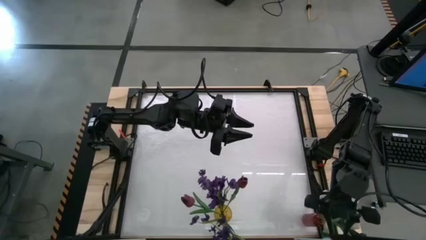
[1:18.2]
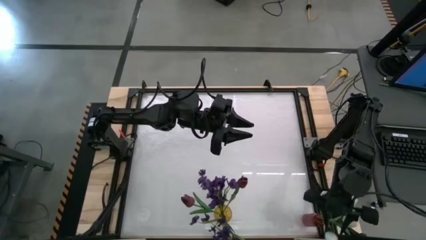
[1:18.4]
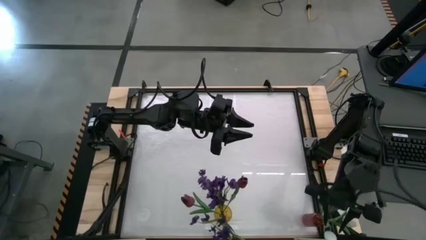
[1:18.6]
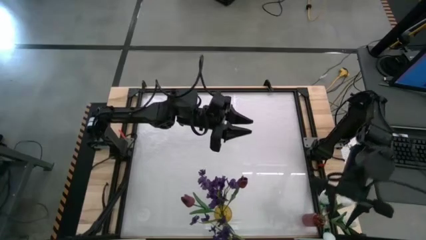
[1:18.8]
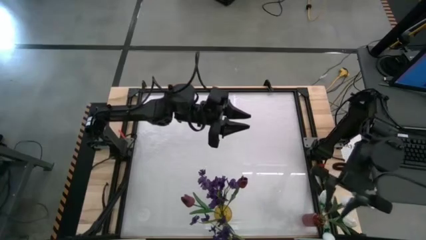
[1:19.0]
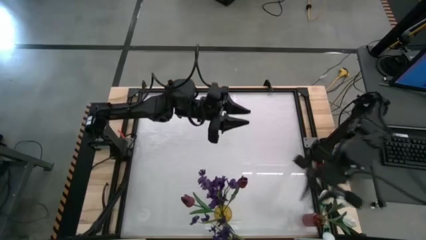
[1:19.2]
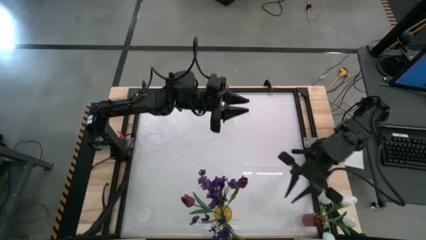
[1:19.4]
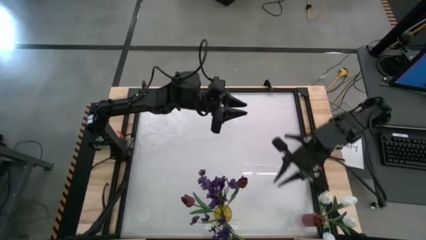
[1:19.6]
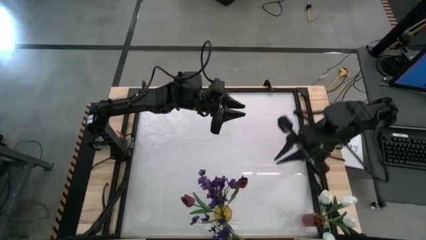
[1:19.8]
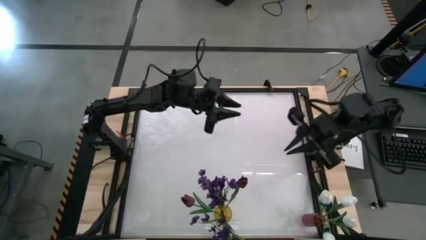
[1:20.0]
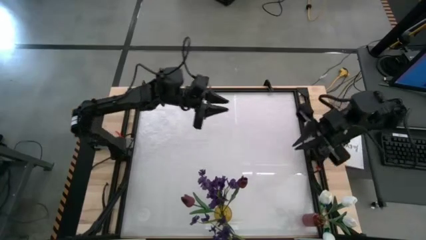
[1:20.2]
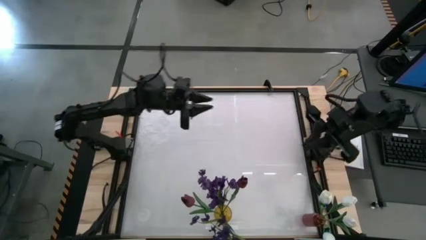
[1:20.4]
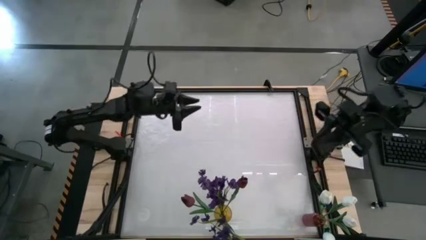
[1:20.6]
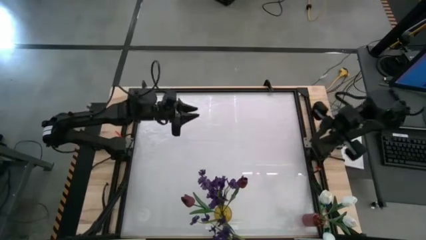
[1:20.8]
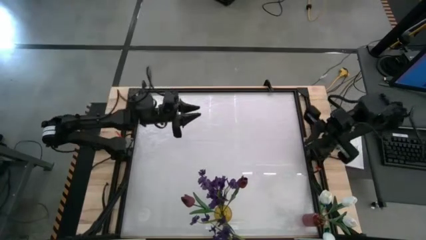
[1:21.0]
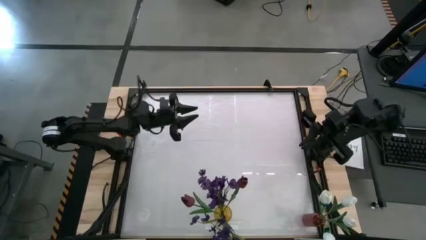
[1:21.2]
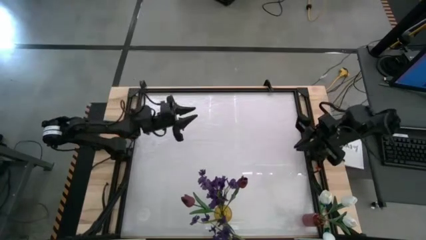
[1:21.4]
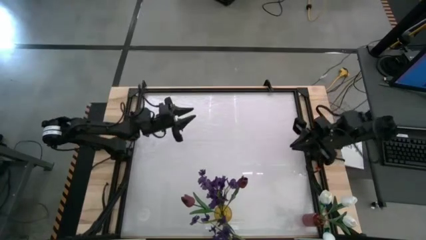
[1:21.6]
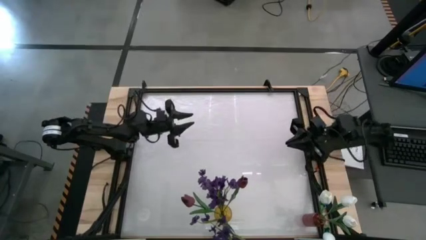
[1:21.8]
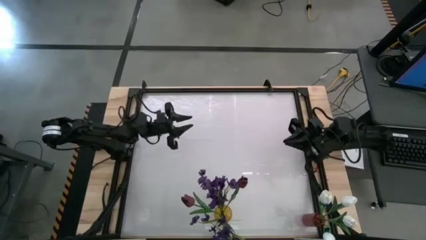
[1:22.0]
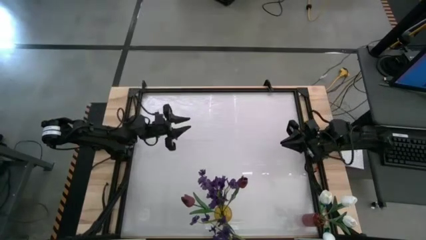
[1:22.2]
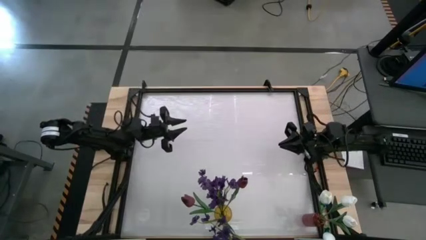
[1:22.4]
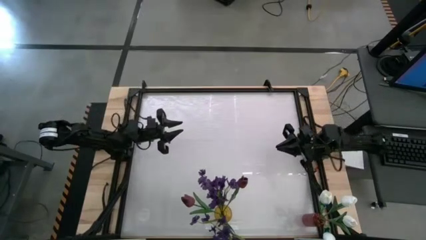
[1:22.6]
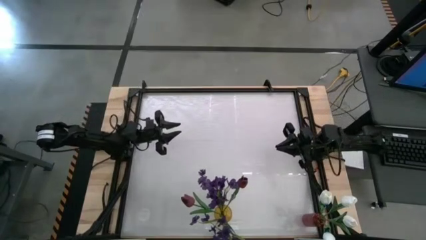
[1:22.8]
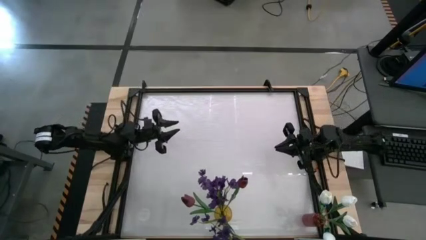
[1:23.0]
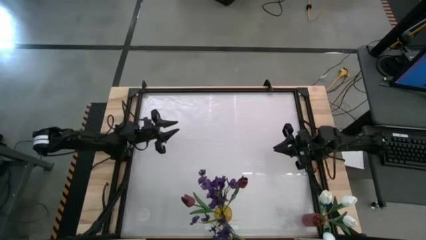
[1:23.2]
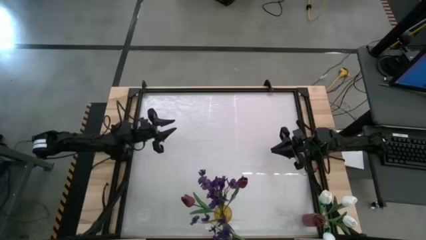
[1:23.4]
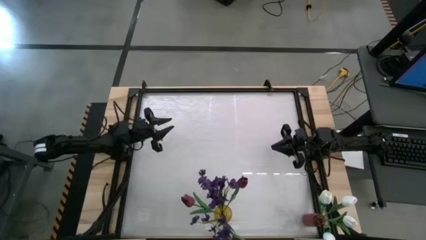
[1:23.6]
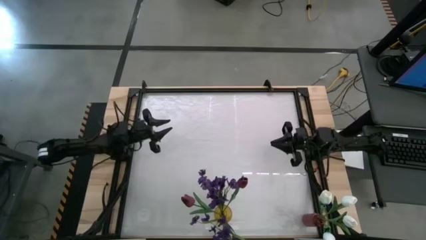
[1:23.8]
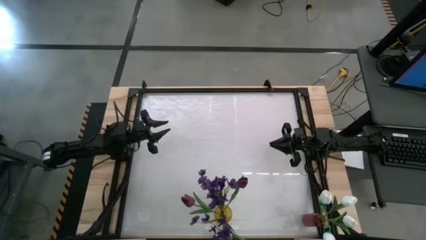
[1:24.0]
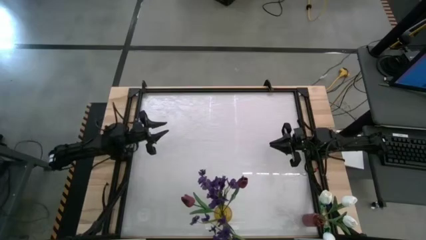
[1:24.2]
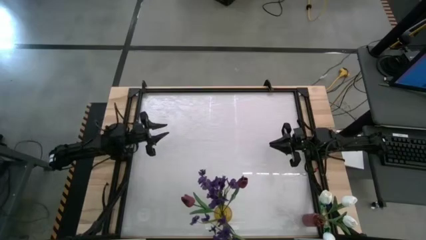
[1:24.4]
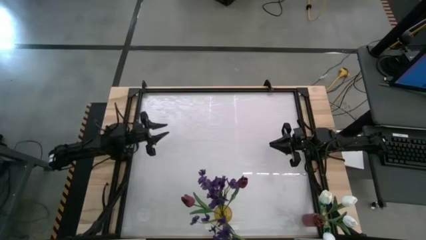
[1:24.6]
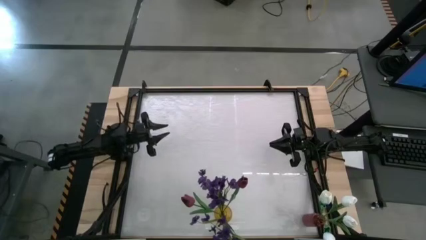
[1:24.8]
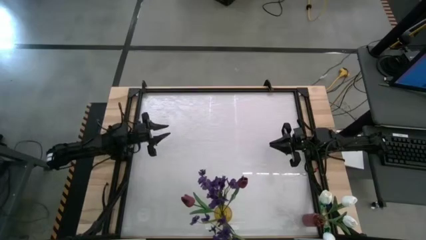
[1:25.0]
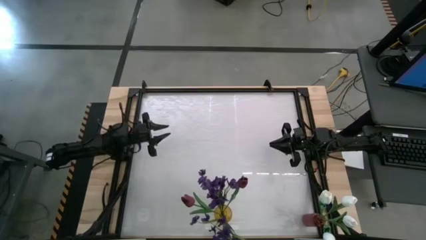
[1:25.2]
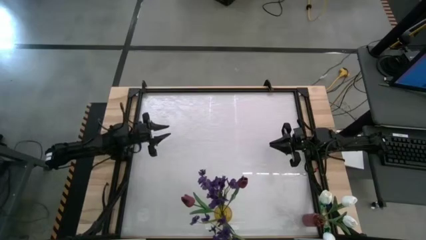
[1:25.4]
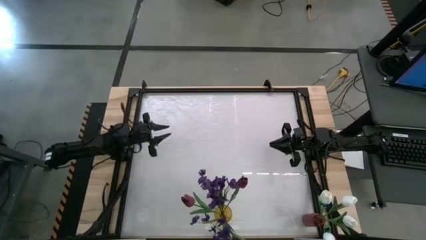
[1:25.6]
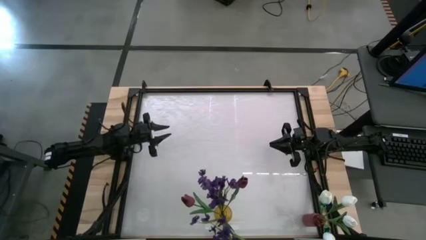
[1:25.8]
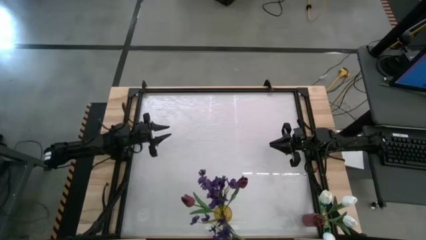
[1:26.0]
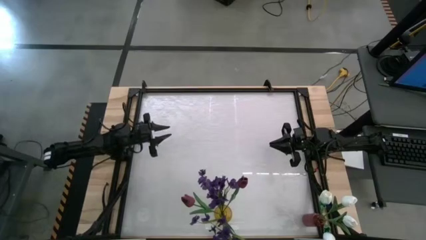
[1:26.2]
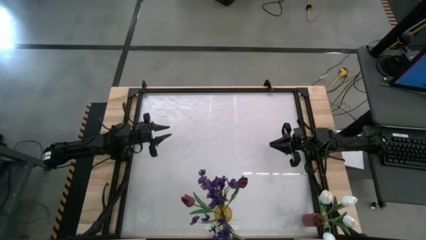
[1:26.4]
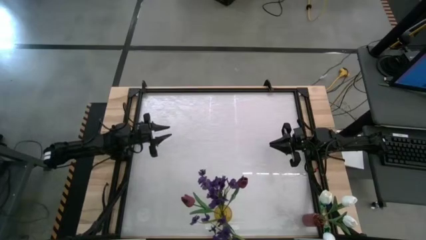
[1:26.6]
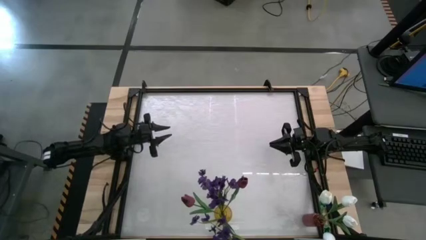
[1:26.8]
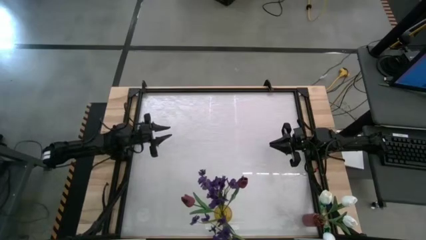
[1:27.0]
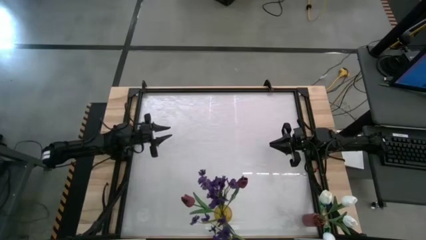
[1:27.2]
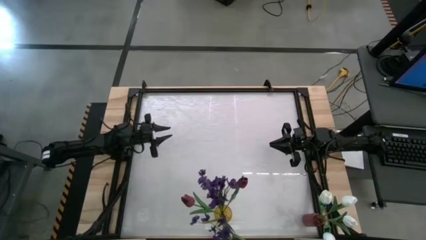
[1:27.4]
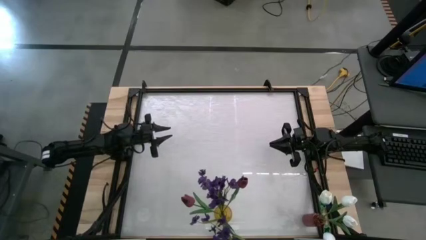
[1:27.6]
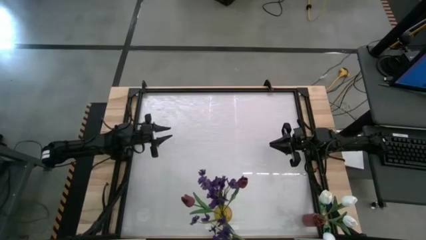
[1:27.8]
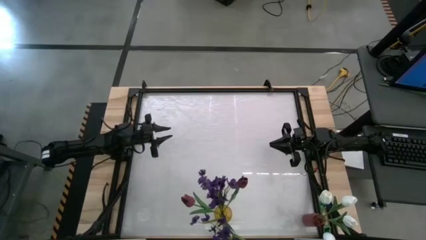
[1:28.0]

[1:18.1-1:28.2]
Task: Sort flowers into vase by color
Return to Home Position
